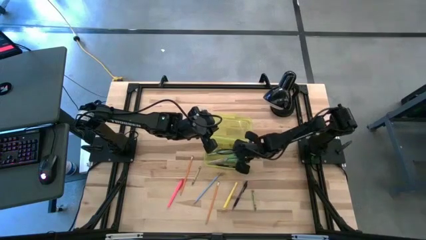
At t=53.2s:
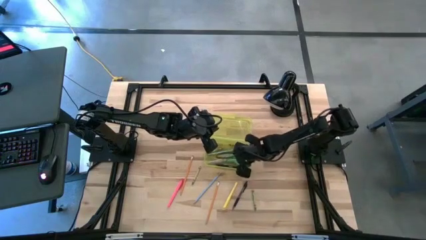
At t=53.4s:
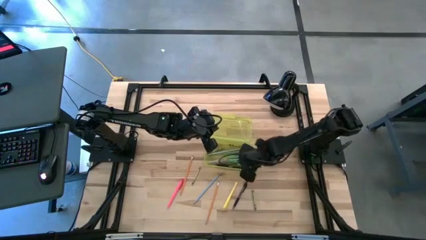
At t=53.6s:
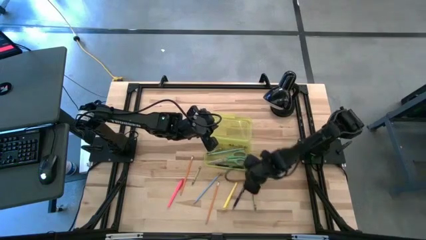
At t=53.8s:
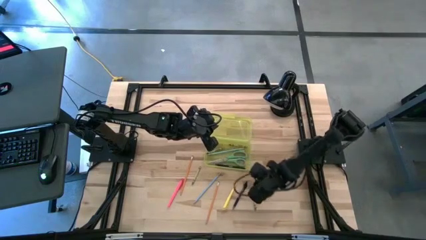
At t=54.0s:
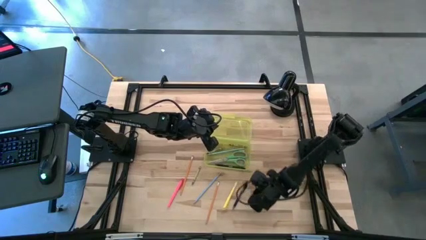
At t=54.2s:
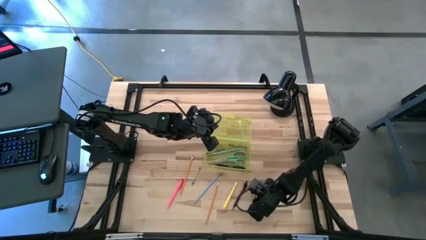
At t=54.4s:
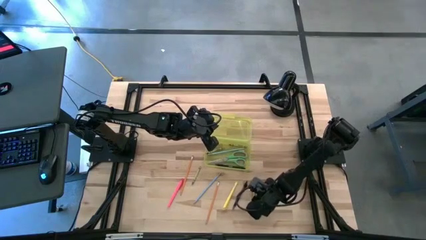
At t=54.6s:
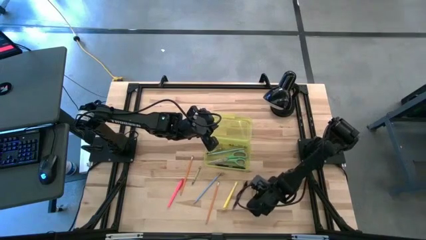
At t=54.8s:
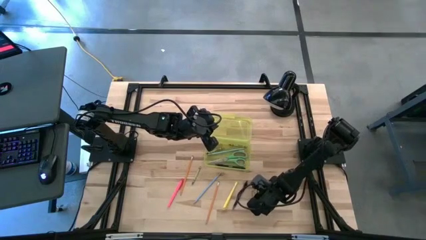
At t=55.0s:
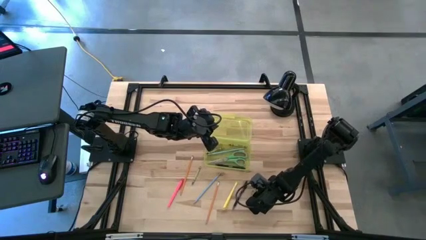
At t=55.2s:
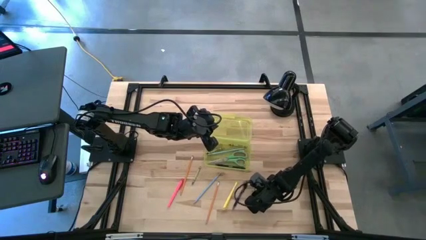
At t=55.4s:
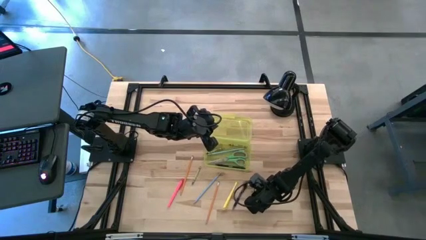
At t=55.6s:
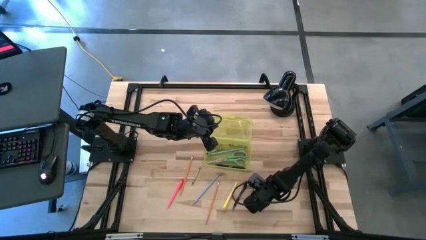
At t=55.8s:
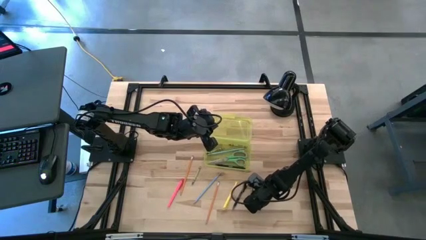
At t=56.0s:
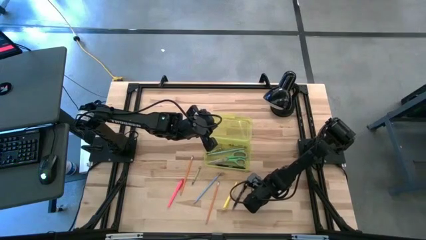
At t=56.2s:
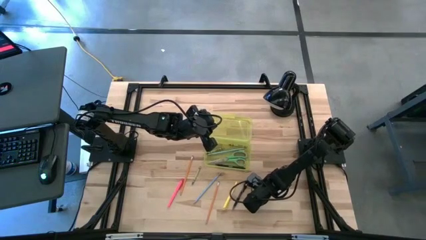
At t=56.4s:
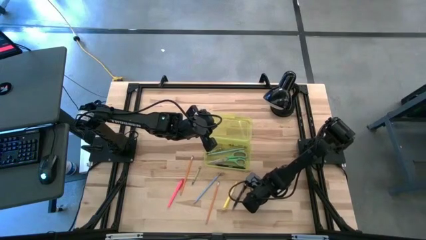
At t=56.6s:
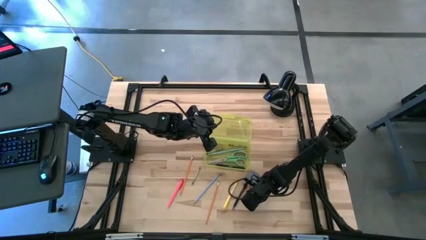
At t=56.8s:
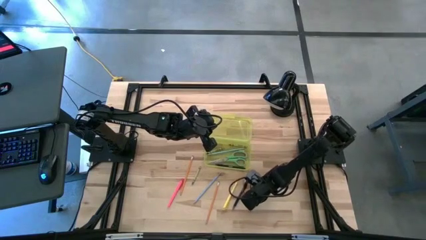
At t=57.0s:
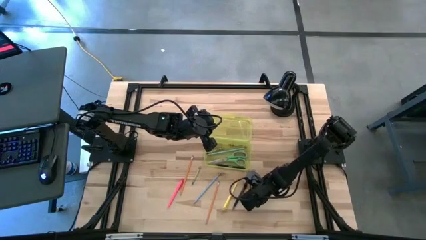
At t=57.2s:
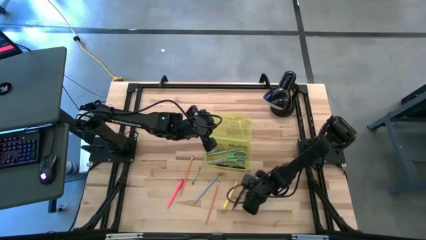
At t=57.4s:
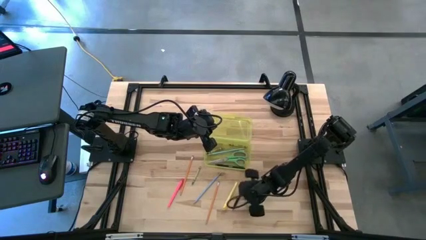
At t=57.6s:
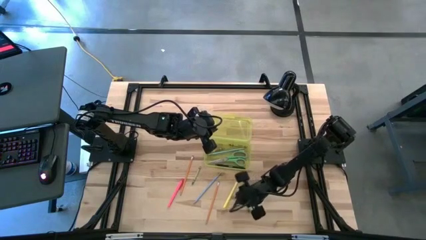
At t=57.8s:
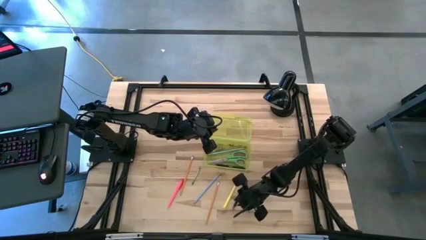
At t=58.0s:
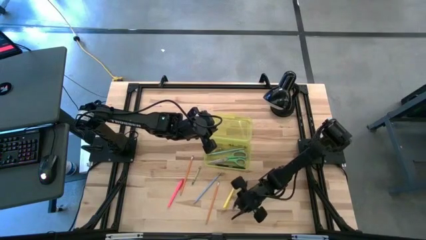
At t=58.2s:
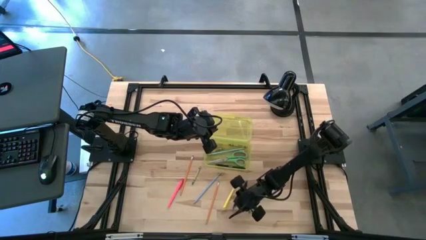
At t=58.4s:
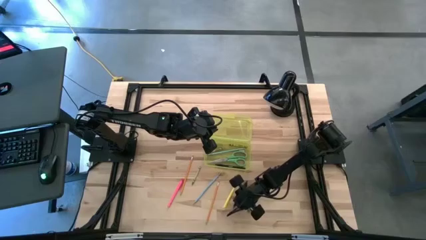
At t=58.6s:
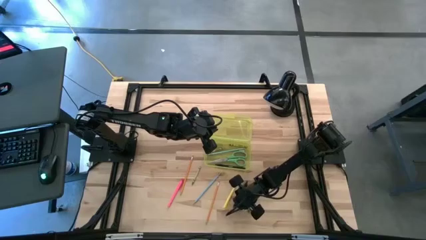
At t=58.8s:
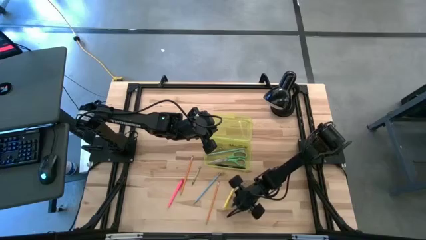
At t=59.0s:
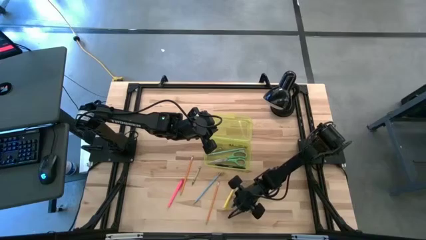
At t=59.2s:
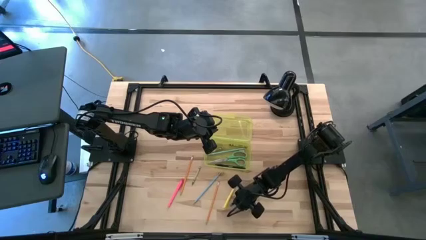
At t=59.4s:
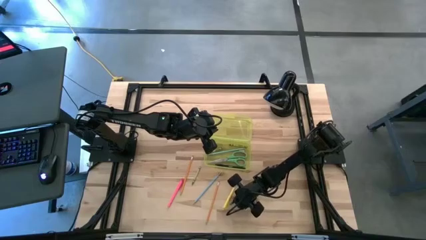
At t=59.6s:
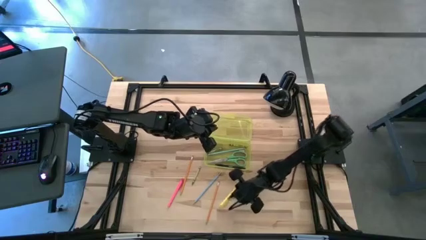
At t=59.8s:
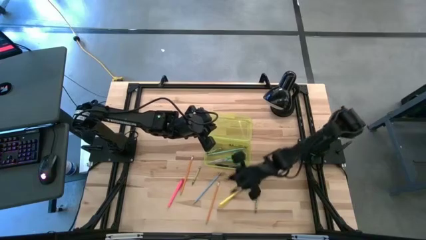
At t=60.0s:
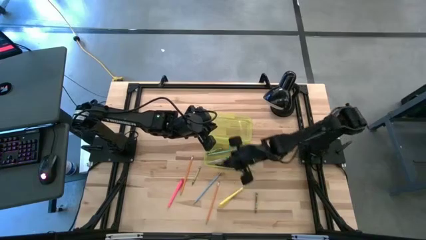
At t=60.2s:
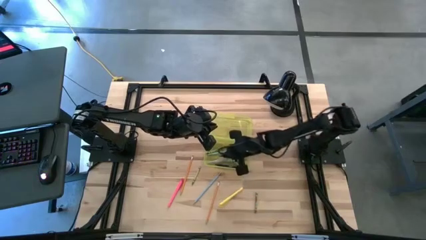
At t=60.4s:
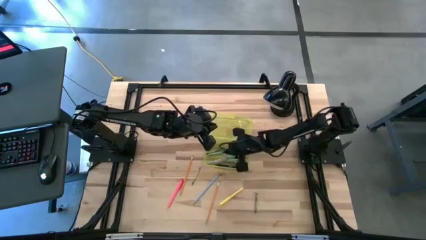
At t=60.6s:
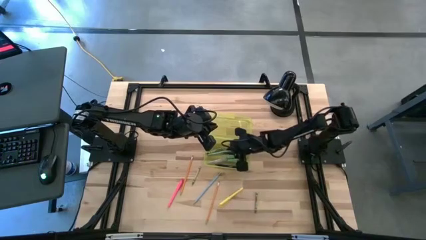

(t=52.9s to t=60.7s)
Task: Pick & place school supplies into a supply box
Put the black pen into the yellow supply box

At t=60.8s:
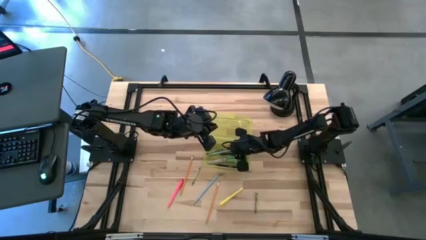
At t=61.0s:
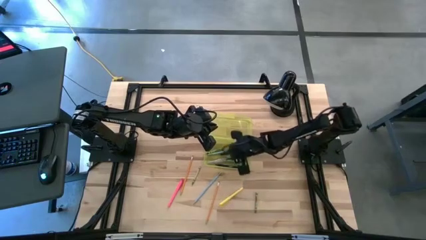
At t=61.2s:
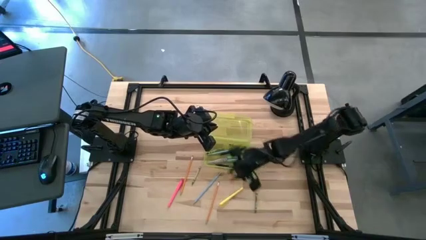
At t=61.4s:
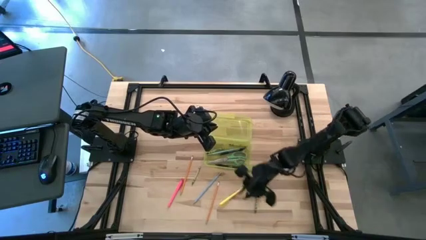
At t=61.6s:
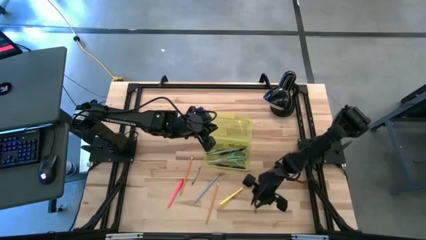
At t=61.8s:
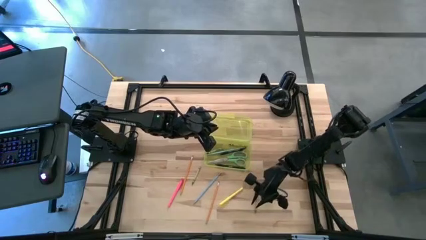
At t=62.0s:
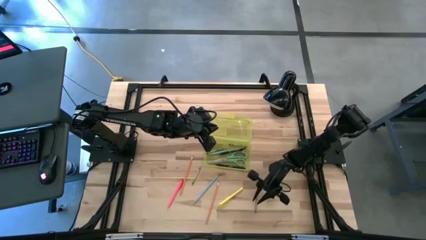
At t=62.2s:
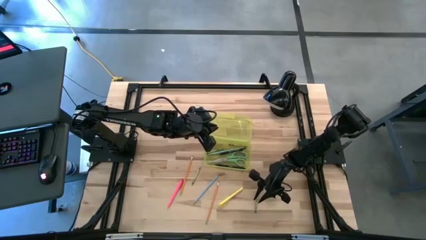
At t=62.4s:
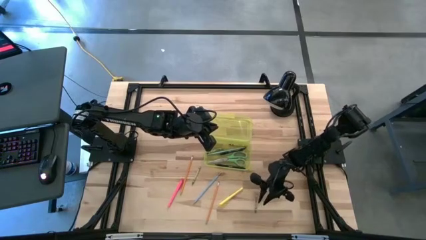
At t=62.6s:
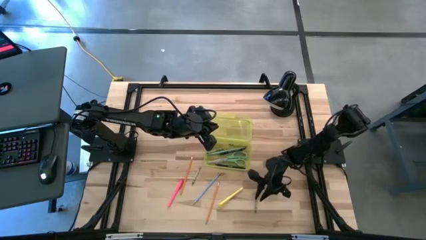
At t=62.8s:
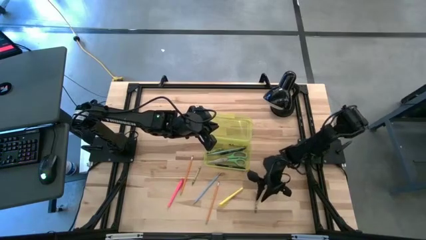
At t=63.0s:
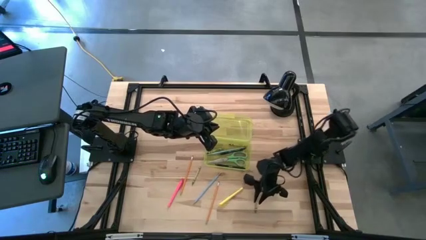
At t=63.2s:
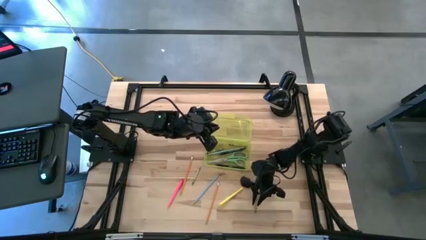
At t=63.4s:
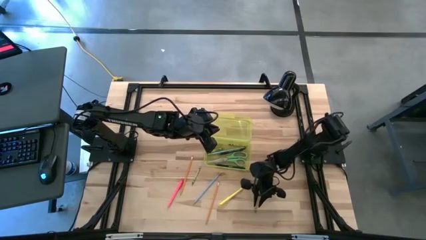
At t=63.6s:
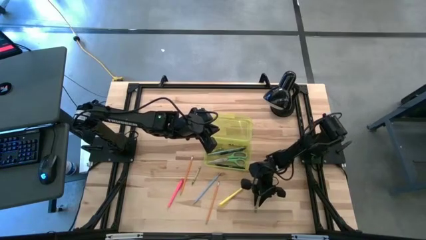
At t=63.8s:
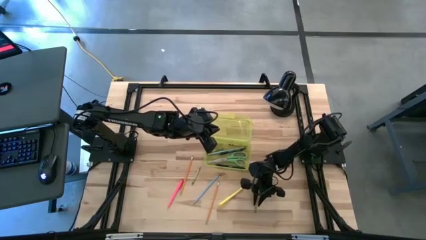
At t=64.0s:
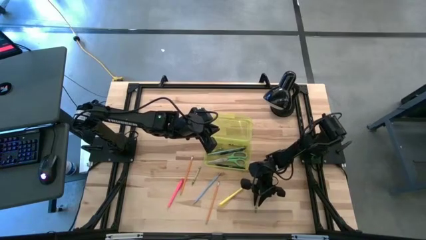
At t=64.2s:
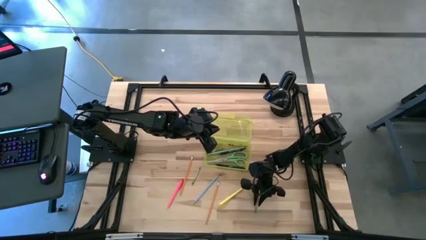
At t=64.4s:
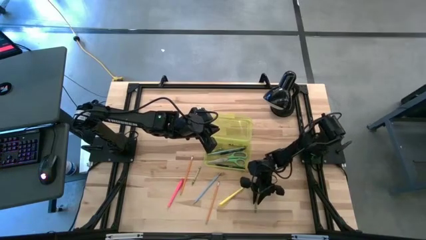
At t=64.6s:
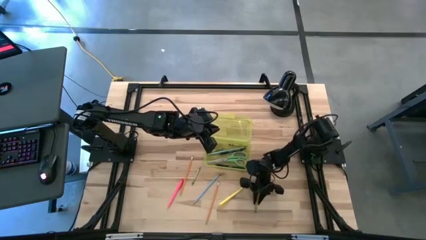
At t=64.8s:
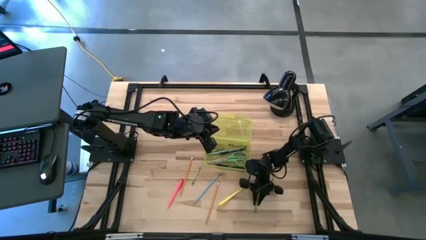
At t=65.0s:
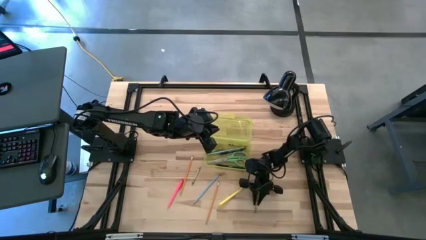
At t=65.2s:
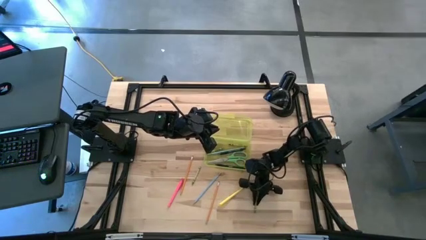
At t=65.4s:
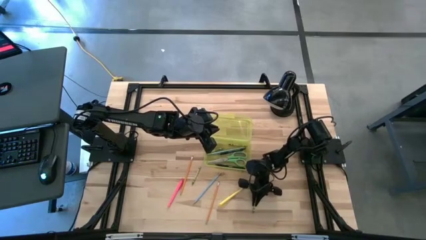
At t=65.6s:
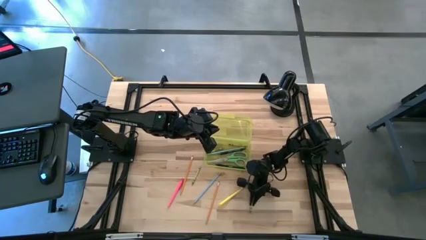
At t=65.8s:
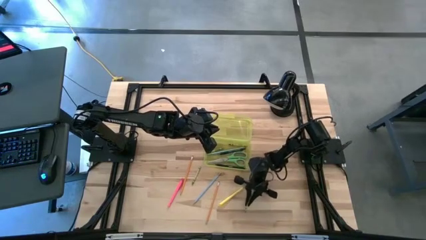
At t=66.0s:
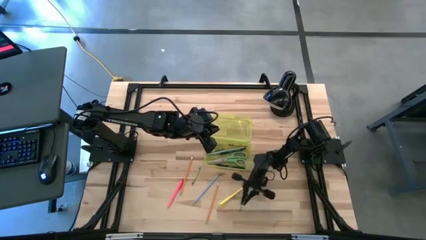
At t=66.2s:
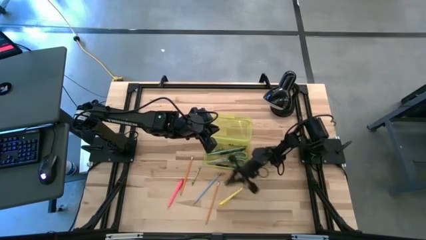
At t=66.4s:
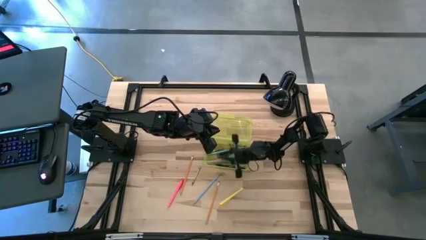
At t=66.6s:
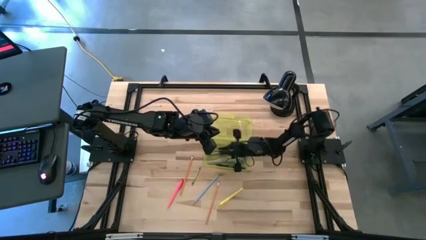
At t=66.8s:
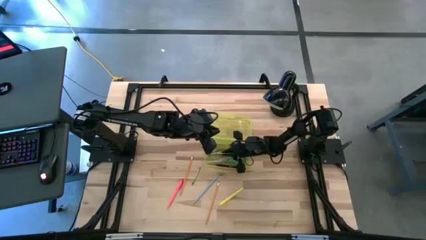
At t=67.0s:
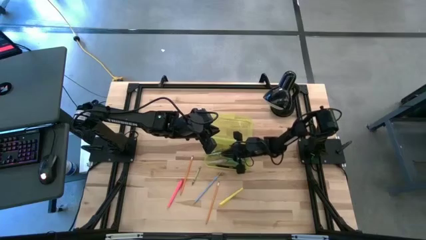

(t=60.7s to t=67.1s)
Put the green crayon into the yellow supply box

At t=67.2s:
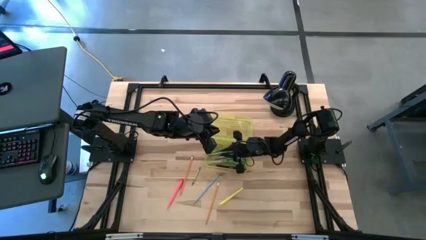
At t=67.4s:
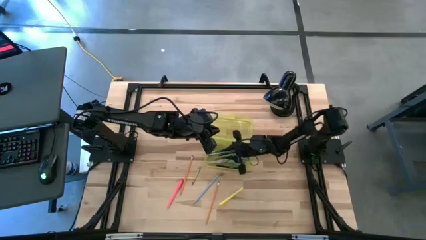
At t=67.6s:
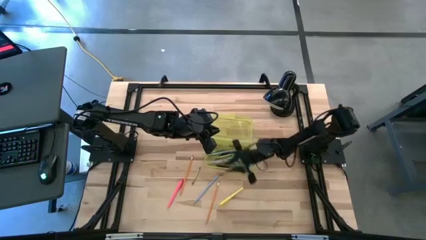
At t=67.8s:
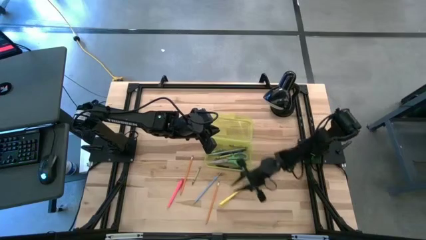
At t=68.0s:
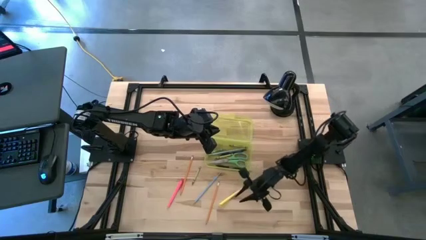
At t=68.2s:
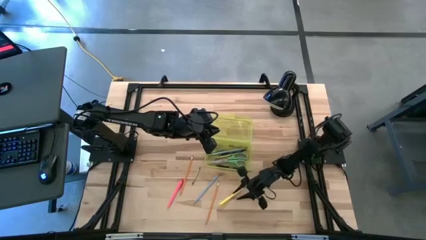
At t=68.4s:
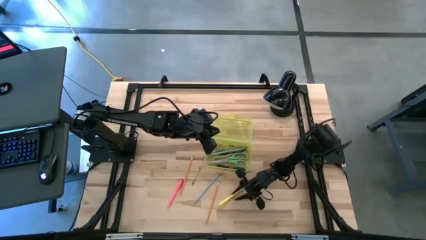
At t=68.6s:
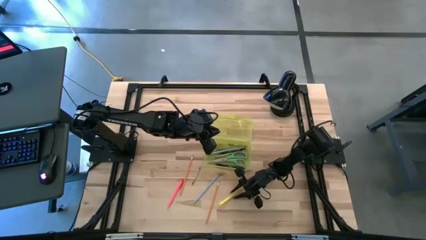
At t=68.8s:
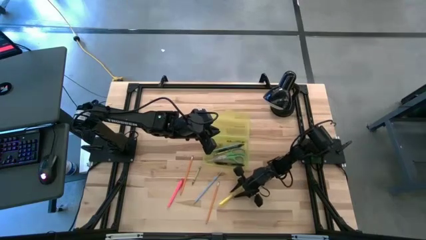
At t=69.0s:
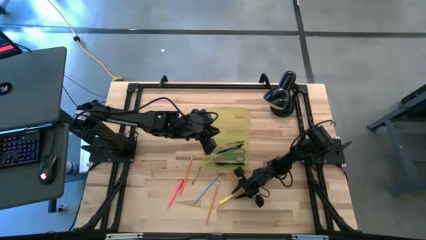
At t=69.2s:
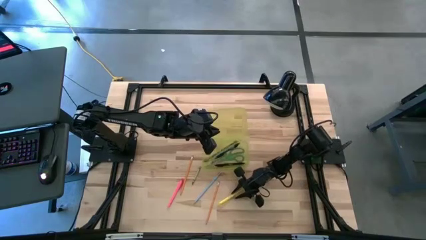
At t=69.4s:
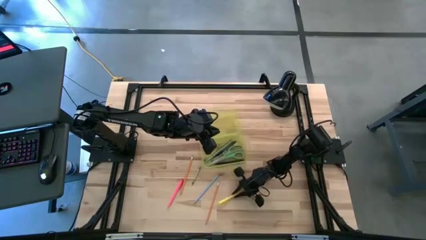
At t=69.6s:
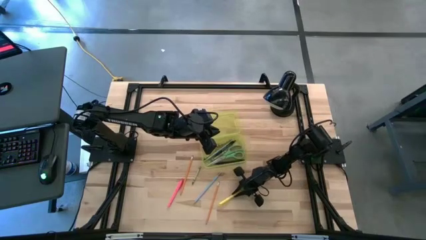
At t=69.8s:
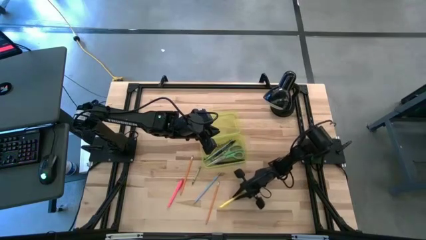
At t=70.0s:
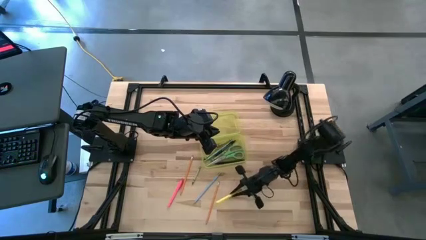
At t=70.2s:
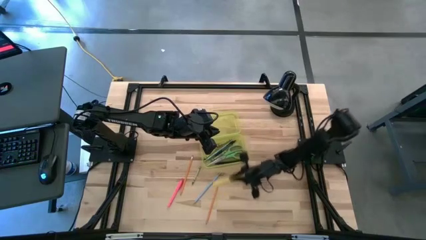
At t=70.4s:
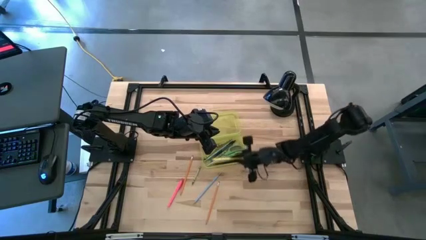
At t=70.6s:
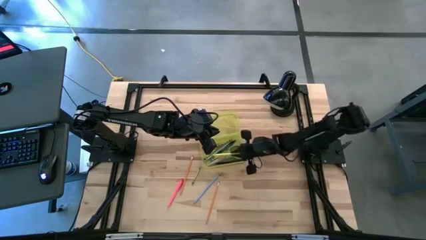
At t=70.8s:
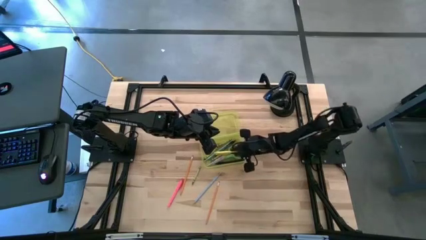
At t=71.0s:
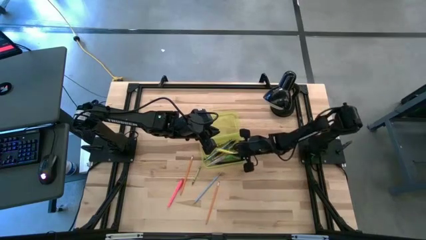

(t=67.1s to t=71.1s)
Put the yellow pen into the yellow supply box
